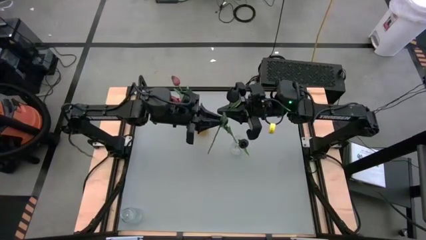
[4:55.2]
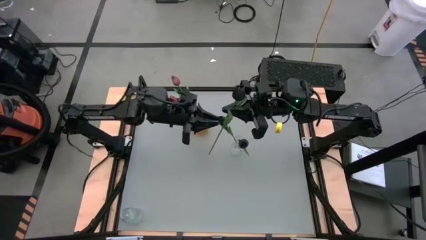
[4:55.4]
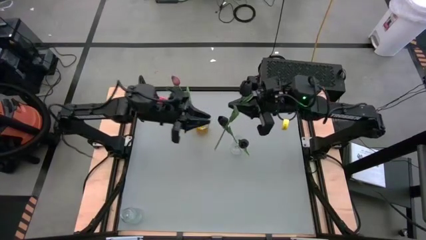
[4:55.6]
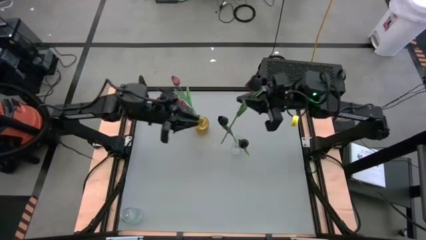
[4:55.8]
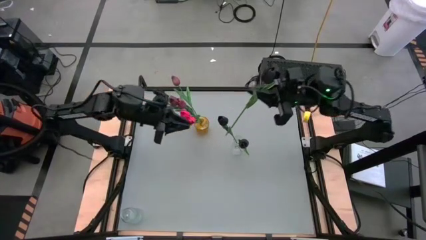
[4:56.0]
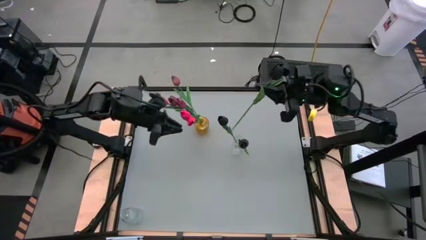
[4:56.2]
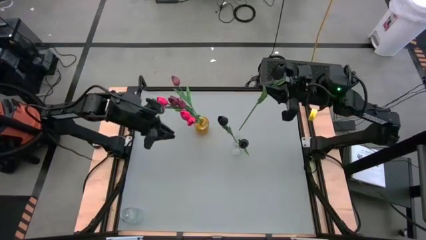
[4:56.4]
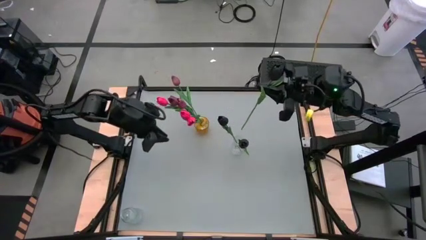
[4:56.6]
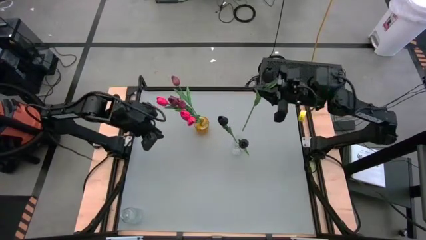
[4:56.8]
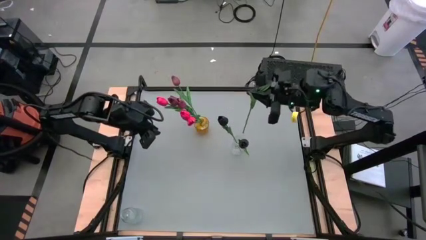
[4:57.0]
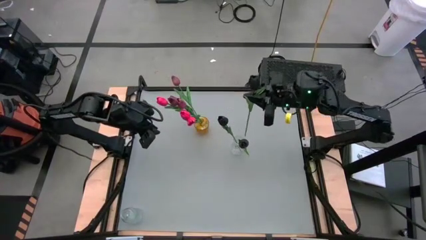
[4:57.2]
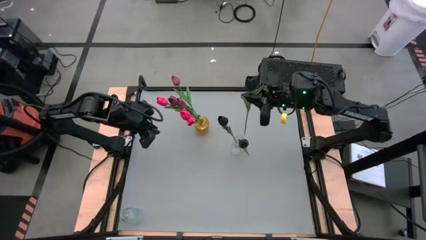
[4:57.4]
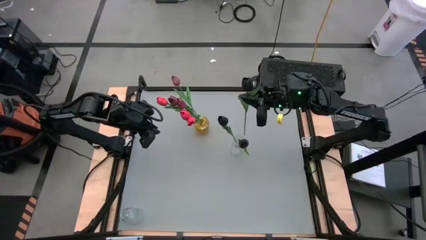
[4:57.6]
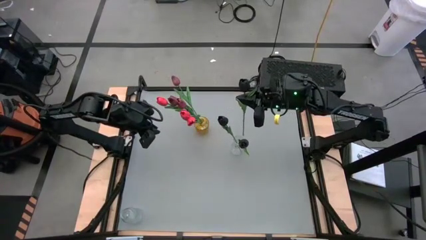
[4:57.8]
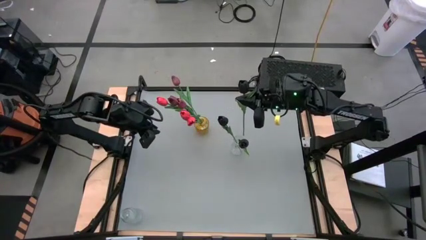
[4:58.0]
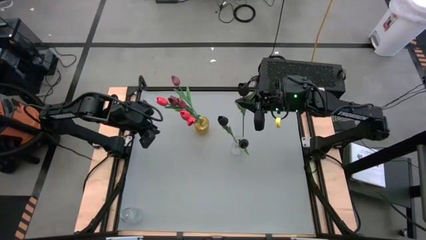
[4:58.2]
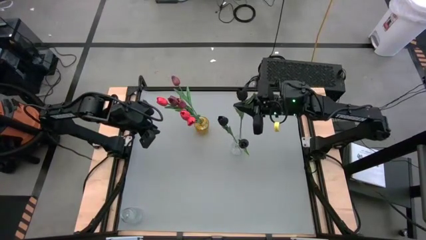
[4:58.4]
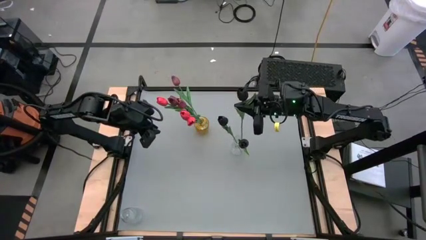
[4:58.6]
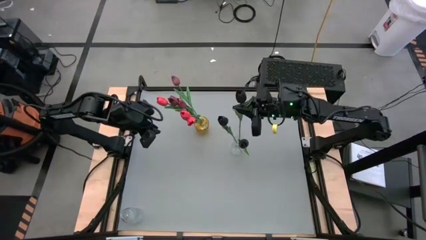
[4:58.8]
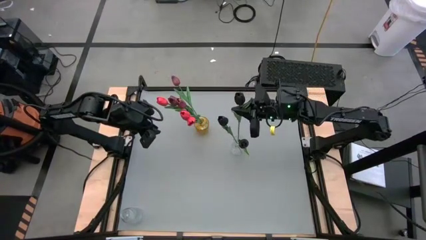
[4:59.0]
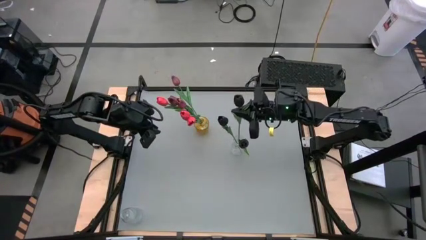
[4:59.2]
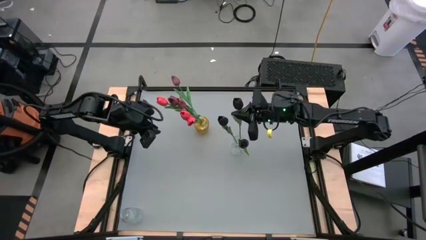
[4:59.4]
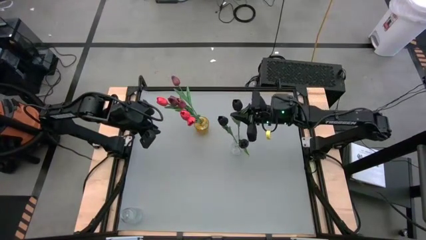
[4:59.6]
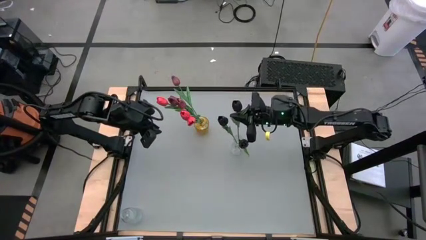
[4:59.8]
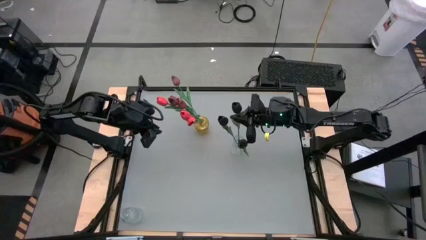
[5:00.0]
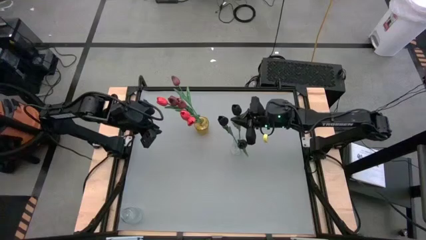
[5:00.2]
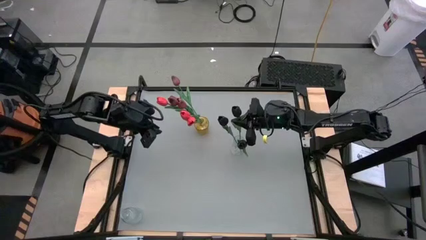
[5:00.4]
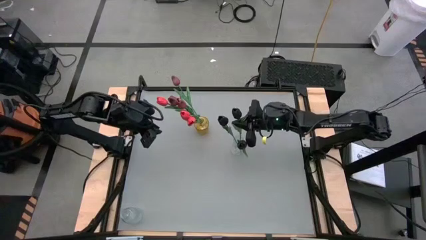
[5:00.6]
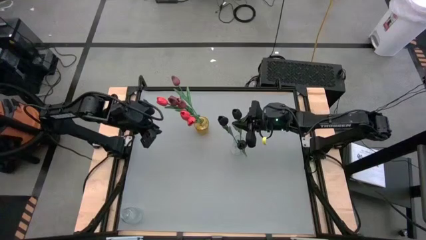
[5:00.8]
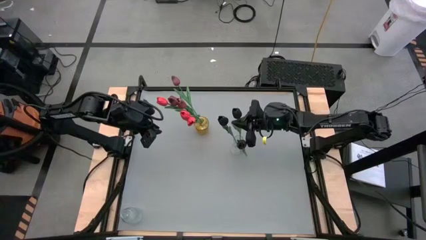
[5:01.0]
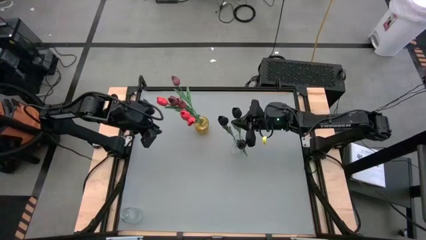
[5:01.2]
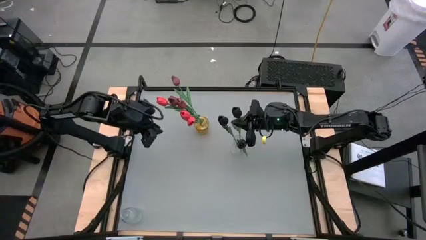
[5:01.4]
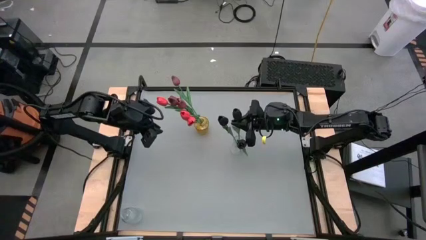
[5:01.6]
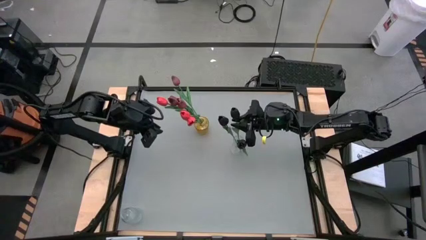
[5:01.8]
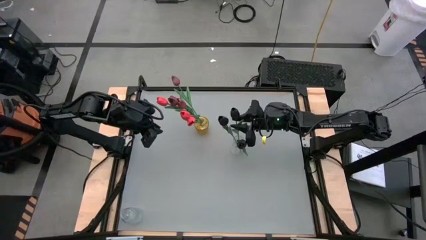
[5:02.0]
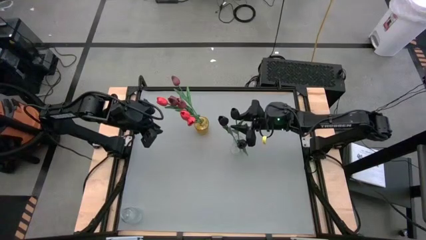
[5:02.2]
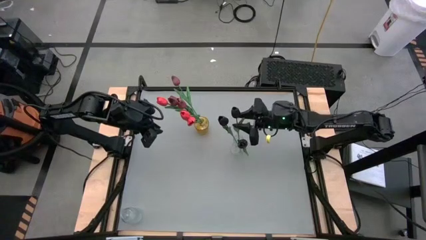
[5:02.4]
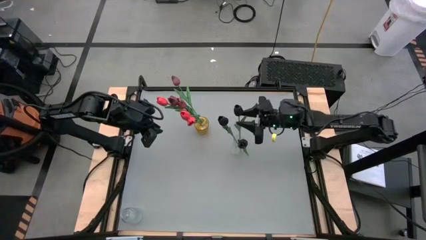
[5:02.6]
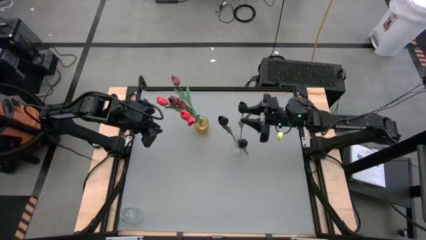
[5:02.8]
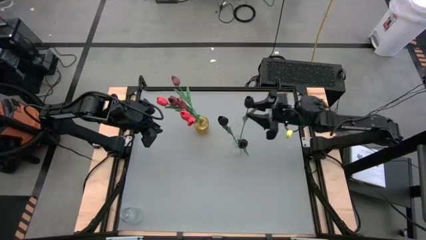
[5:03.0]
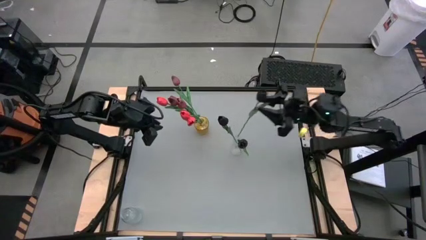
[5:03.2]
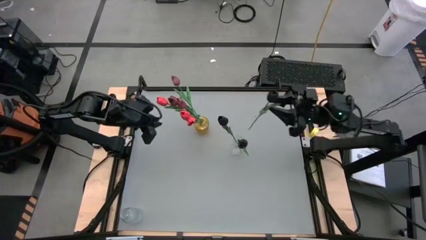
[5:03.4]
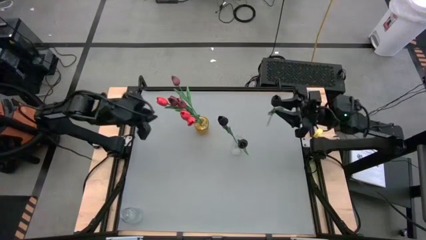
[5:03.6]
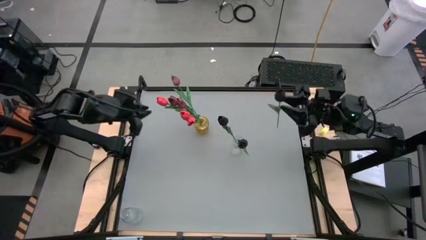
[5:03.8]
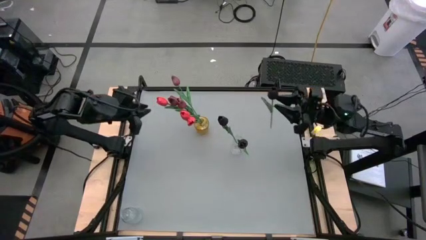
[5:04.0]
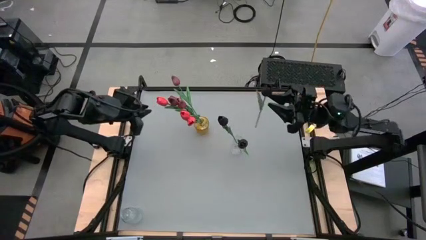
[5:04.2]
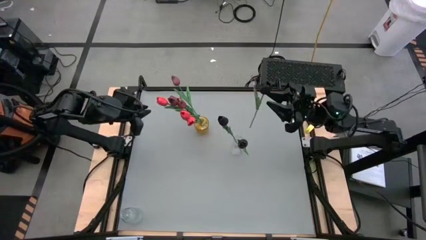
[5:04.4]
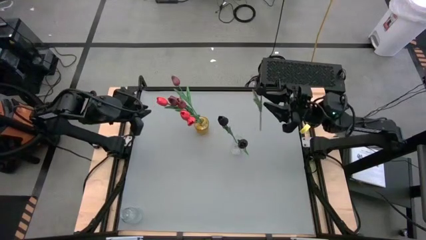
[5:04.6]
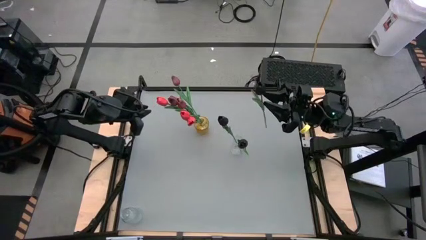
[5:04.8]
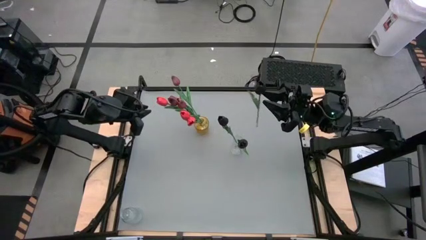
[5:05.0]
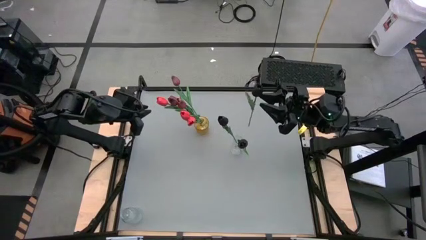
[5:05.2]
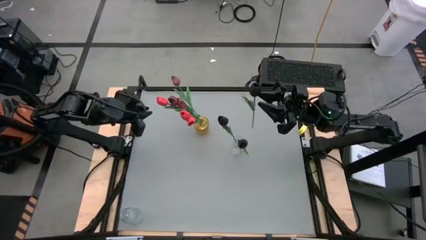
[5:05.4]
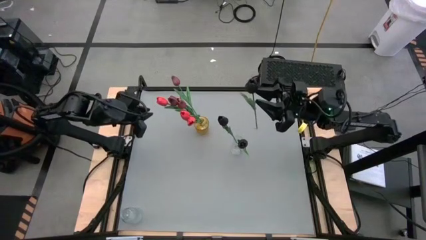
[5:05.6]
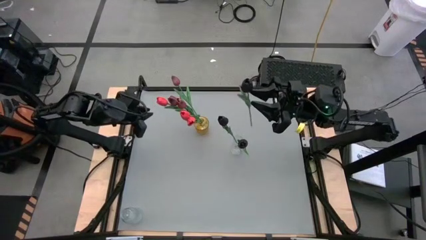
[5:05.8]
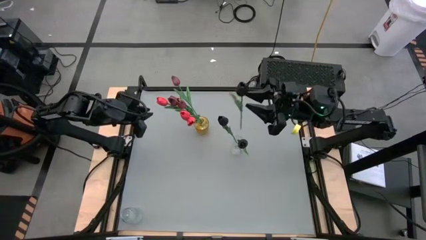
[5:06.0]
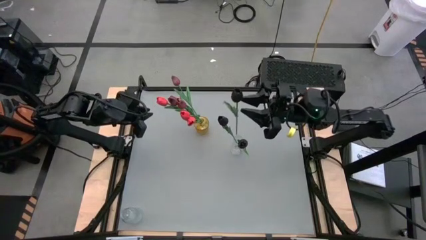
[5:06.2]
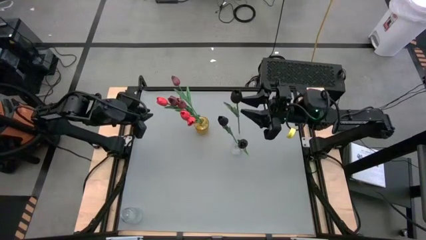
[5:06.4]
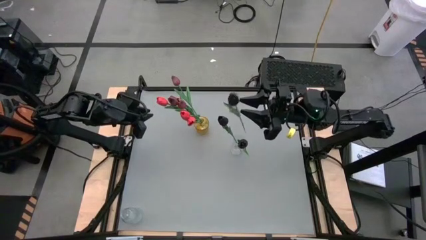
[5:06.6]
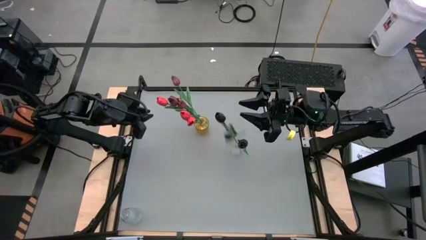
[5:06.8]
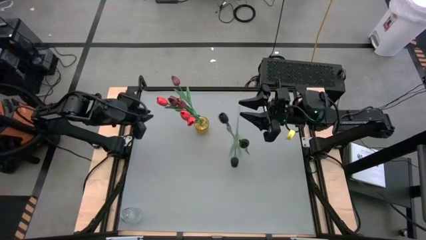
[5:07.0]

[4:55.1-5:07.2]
Task: Sort flowers into vase by color
Put the black flower into the transparent vase
